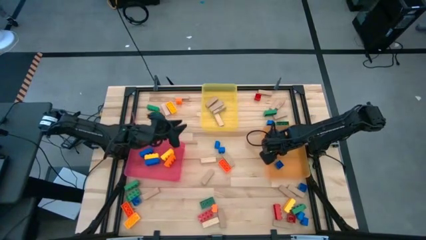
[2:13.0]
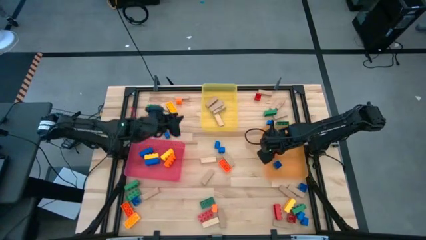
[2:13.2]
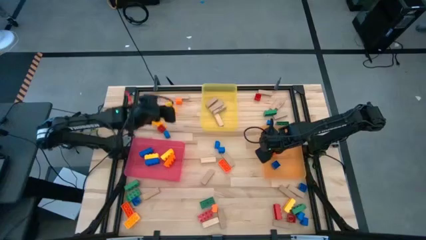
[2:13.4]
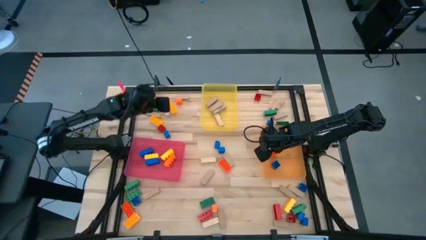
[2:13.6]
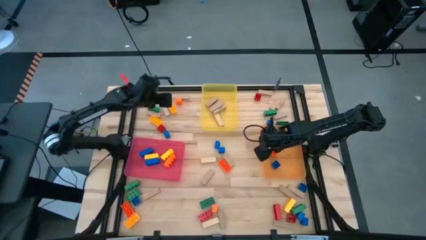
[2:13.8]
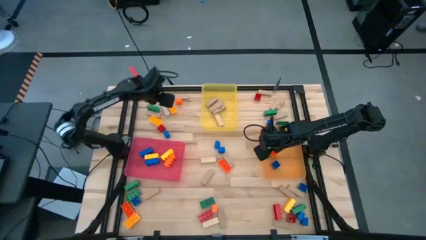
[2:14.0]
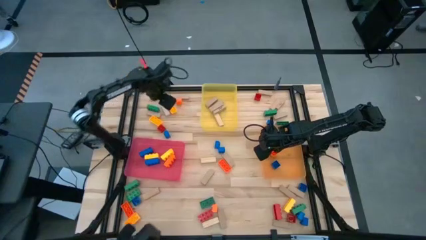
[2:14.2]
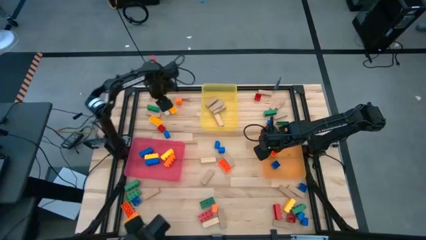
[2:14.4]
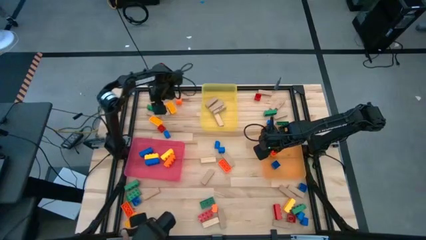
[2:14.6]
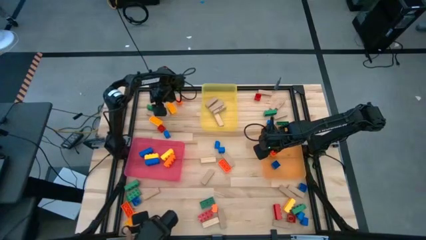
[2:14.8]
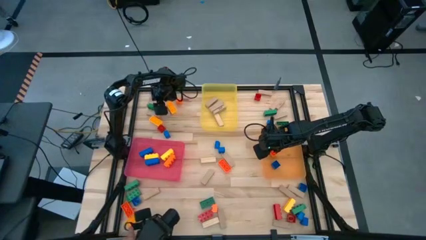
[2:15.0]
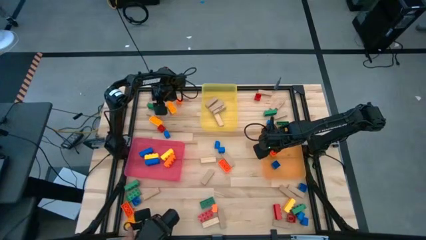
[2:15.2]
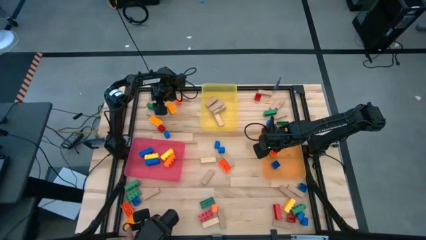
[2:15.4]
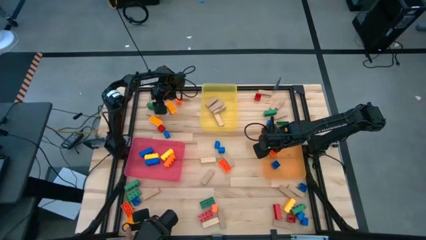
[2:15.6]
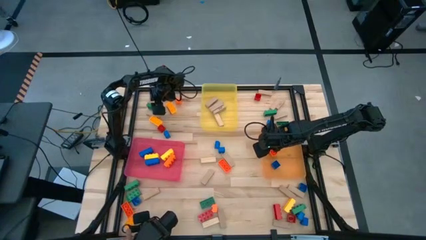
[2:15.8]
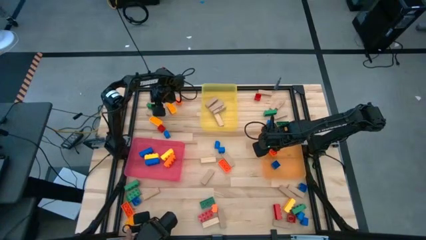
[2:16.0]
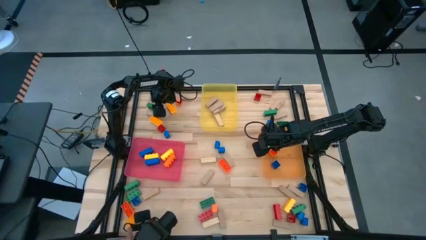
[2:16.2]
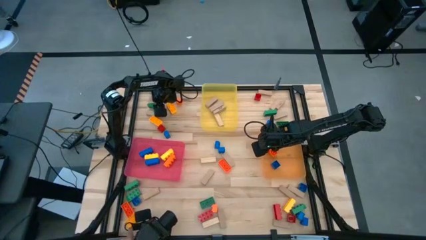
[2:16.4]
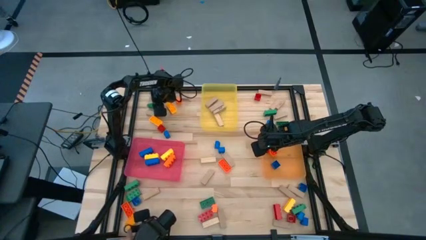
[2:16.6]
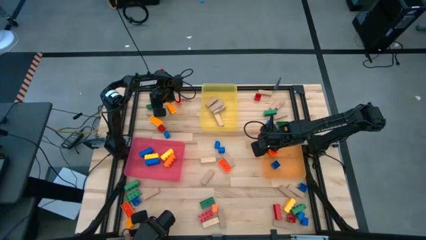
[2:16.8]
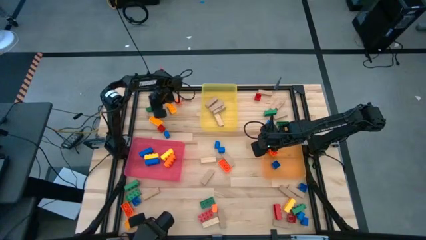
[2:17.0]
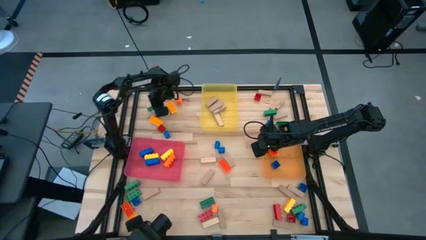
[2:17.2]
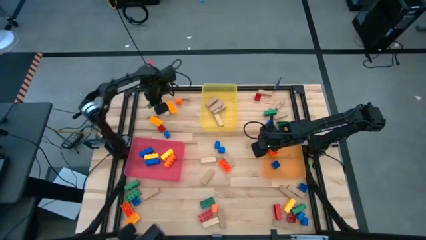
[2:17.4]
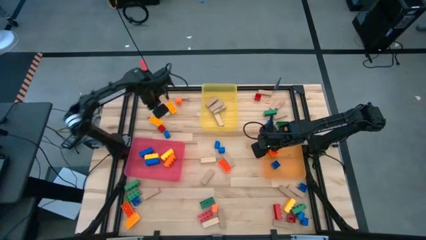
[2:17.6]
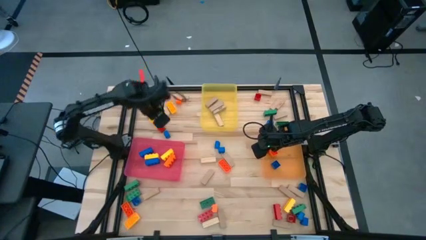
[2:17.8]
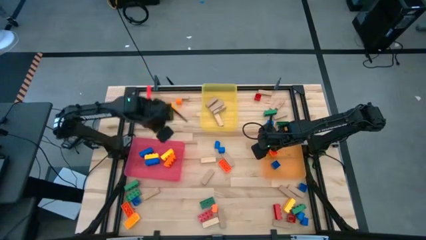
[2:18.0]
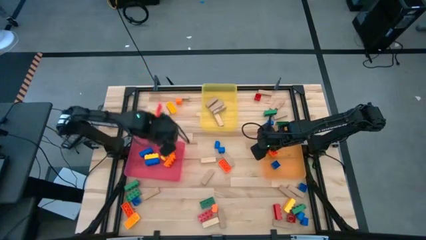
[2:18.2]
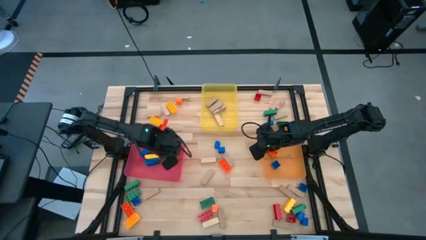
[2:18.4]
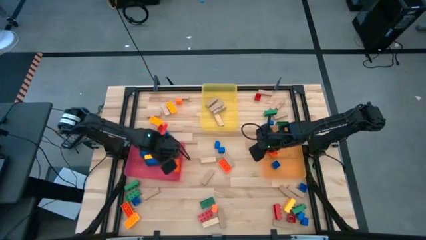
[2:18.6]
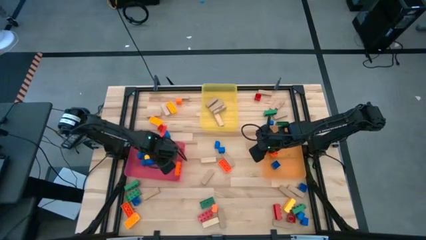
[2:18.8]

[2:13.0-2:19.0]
Task: Sort blocks by size
Put the 3 stud green game piece into the pink bin

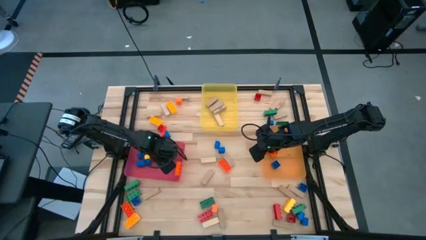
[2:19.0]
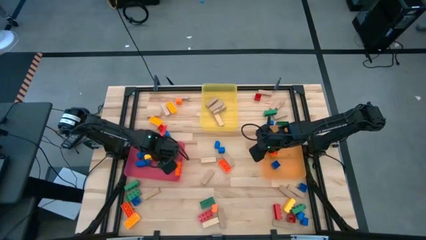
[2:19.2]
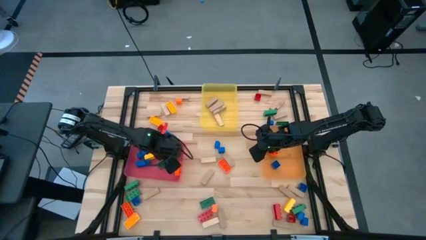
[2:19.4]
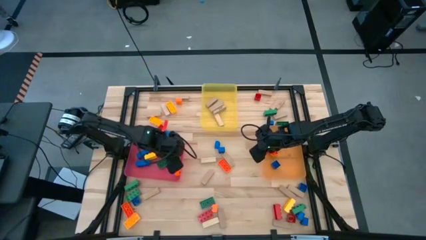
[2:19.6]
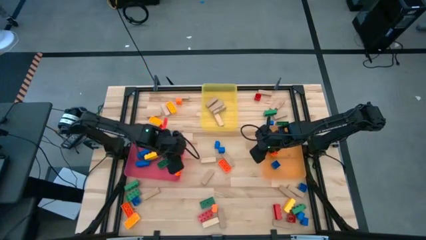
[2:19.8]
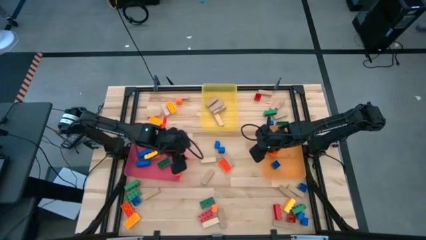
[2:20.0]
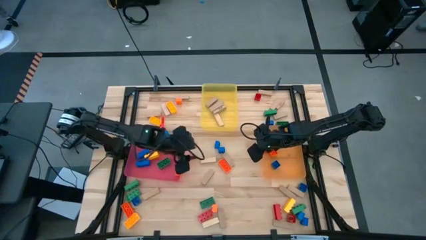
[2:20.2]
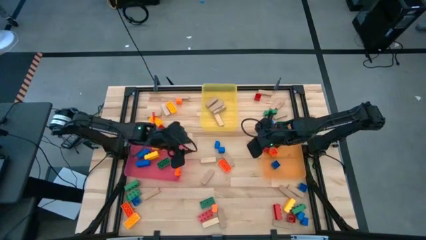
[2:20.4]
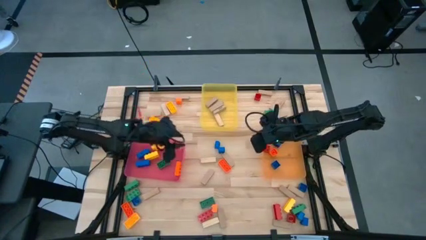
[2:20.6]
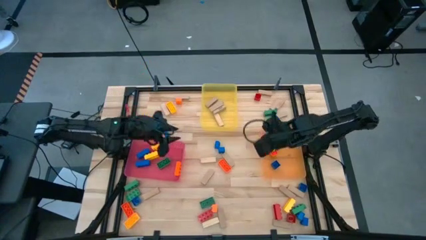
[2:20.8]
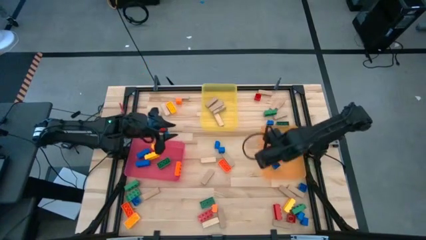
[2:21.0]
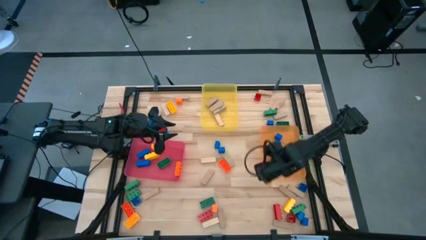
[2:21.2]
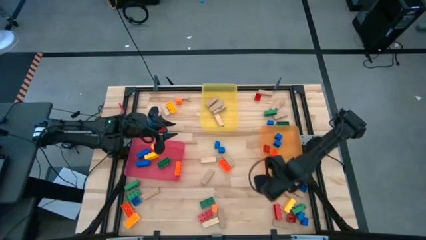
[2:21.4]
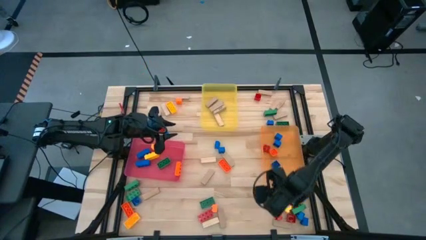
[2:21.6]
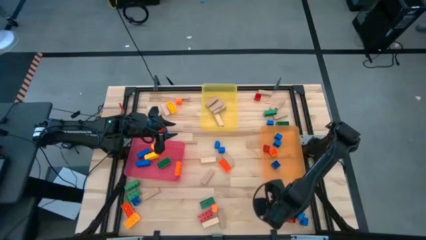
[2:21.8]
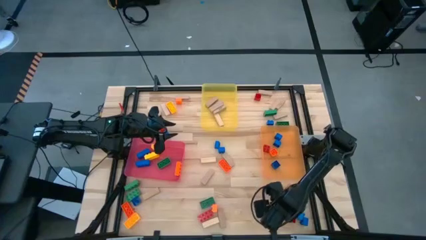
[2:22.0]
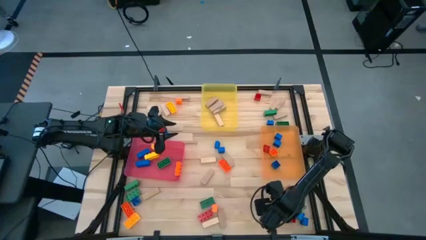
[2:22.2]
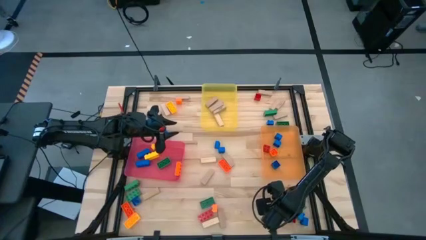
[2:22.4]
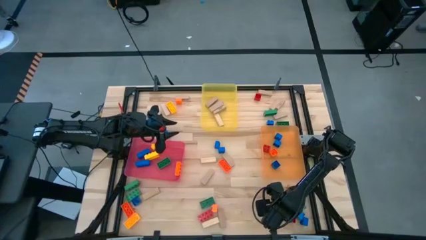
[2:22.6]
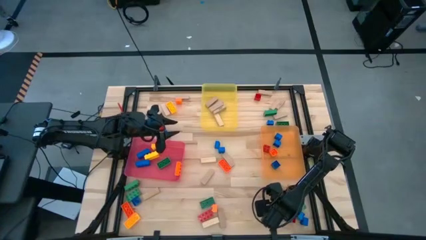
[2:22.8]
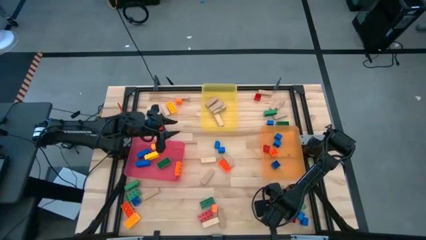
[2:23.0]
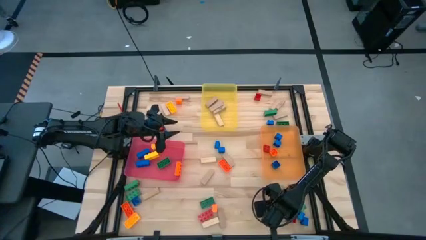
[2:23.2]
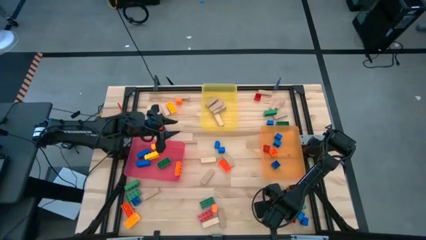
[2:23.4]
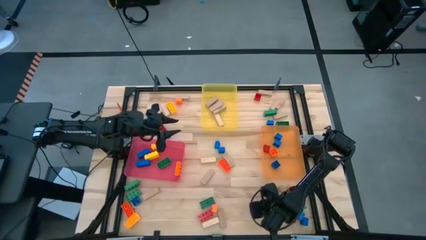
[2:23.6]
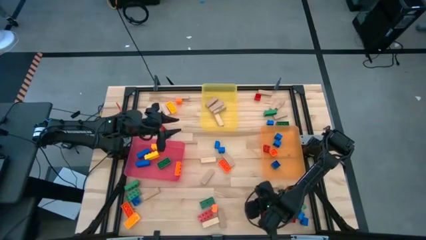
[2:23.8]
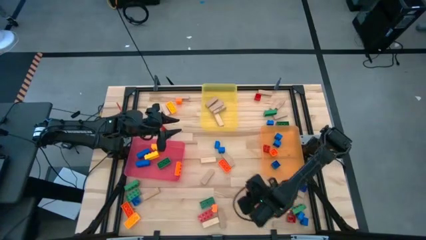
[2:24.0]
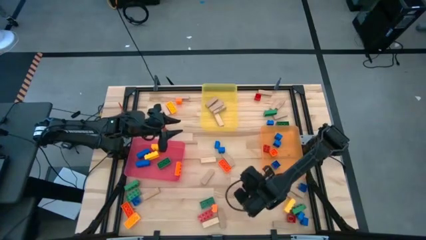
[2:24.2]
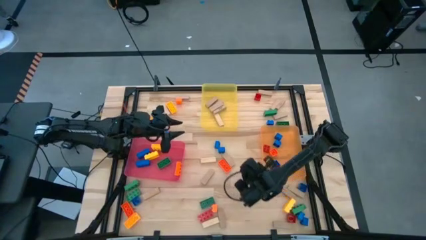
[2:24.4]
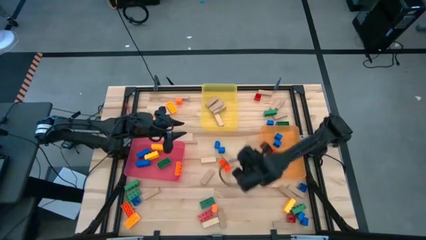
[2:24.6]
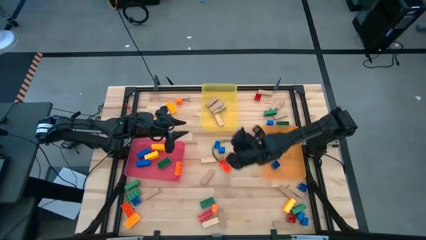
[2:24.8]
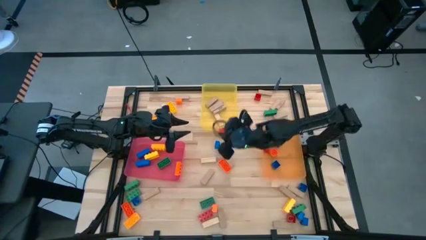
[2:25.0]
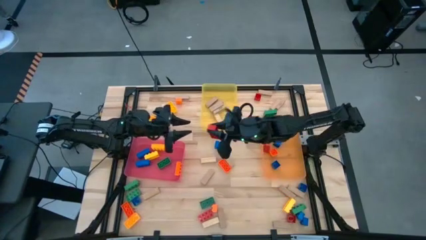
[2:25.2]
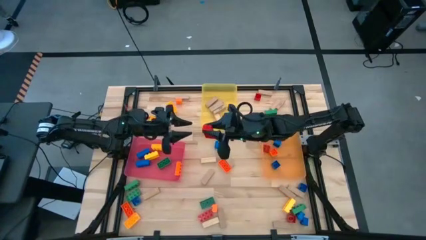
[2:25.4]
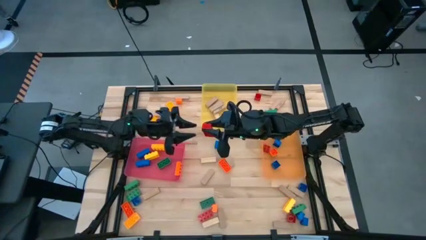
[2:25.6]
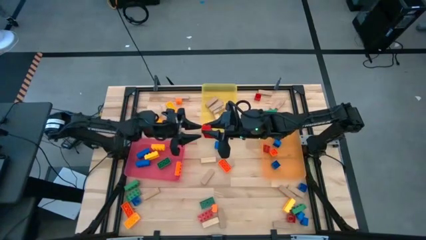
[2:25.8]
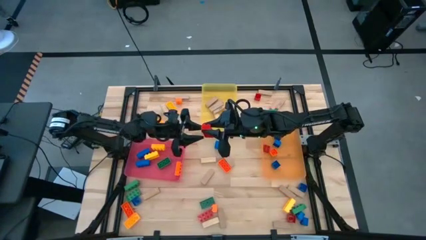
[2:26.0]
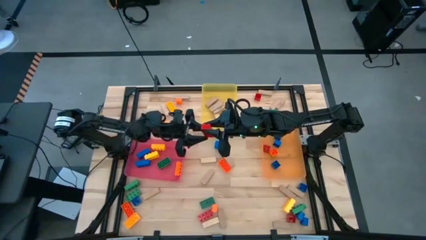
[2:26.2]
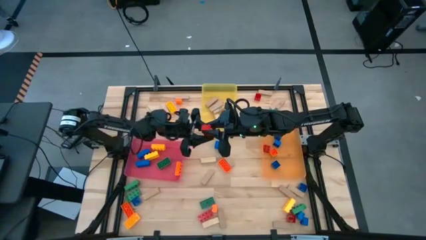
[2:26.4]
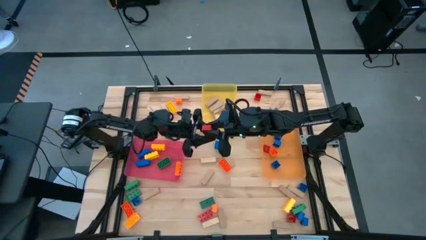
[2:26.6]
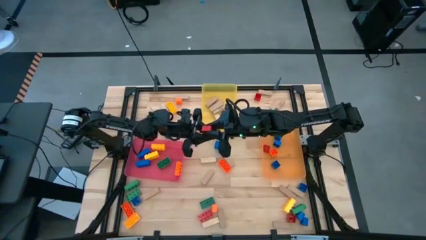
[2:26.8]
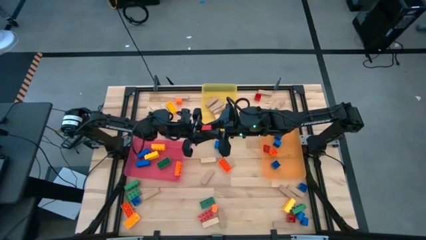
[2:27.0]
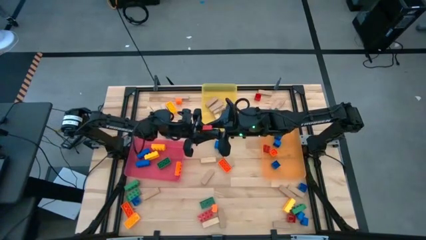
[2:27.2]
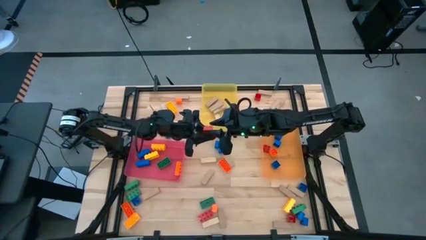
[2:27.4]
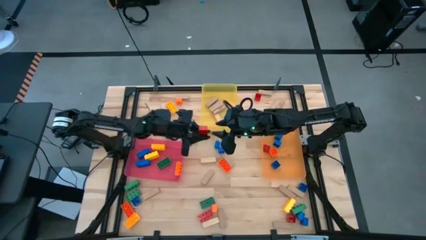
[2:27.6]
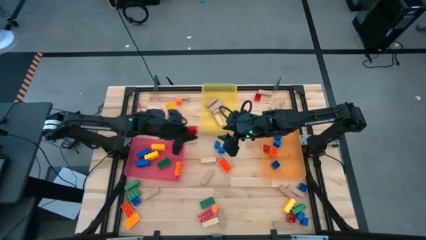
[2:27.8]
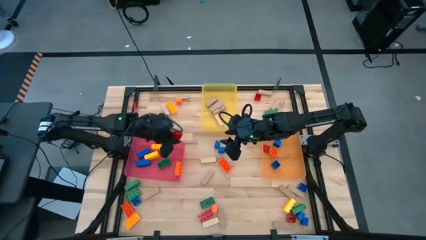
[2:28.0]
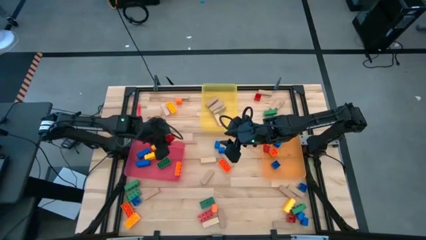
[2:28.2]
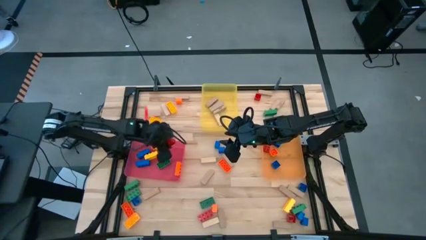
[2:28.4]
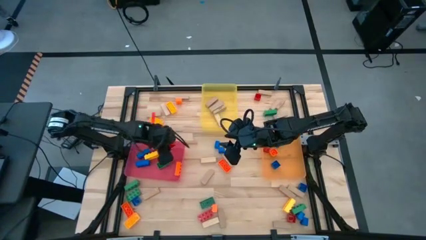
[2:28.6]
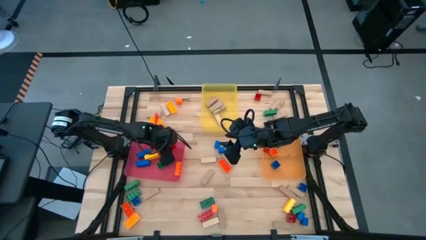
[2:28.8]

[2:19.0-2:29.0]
Put the 3 stud red game piece into the pink bin
